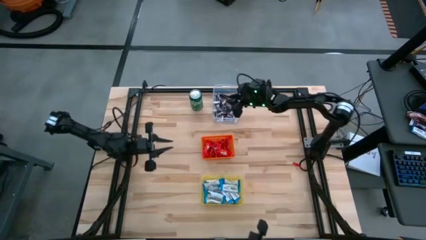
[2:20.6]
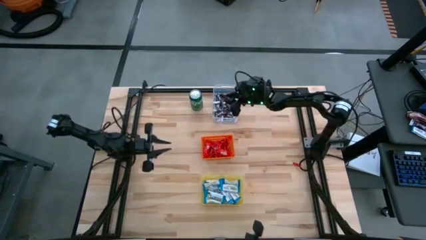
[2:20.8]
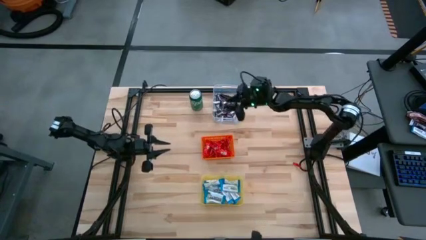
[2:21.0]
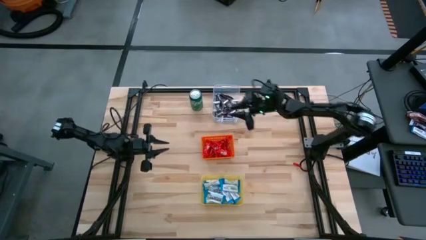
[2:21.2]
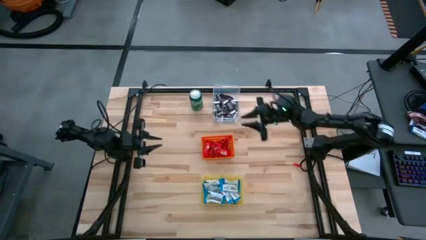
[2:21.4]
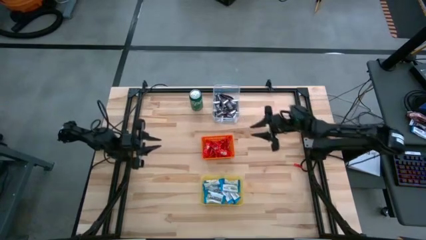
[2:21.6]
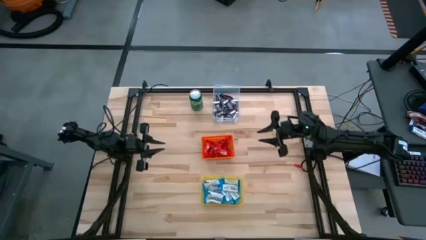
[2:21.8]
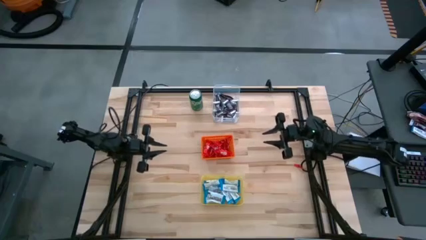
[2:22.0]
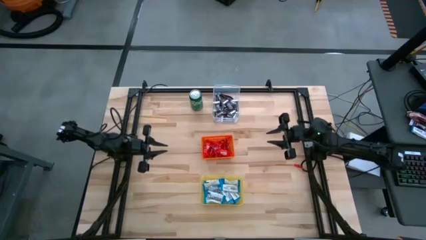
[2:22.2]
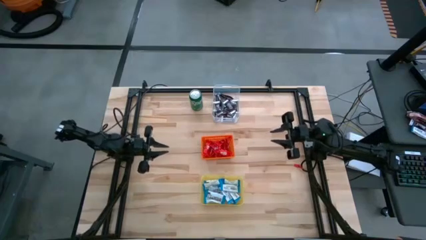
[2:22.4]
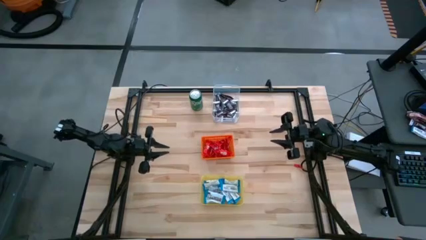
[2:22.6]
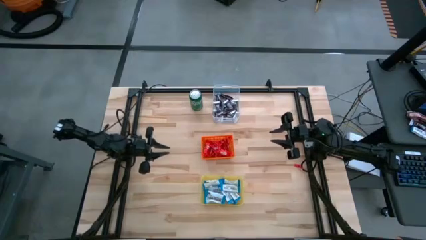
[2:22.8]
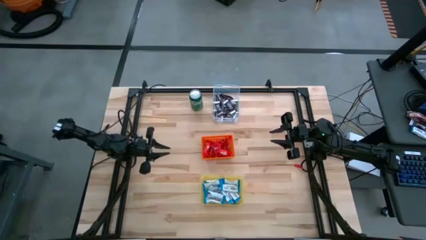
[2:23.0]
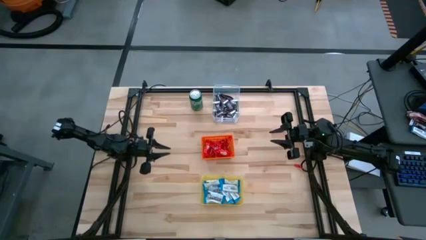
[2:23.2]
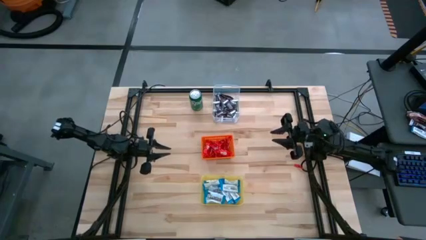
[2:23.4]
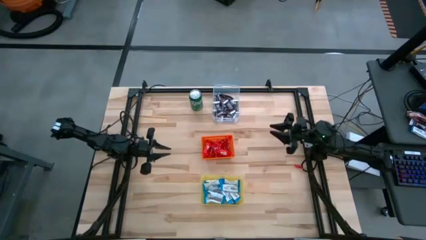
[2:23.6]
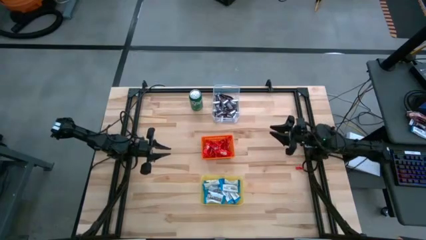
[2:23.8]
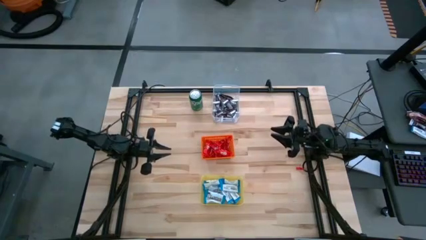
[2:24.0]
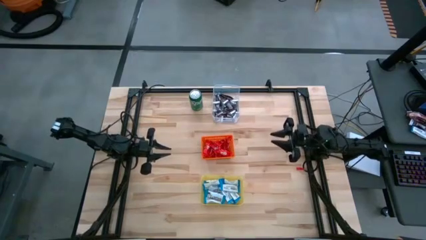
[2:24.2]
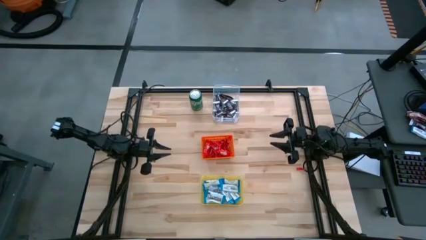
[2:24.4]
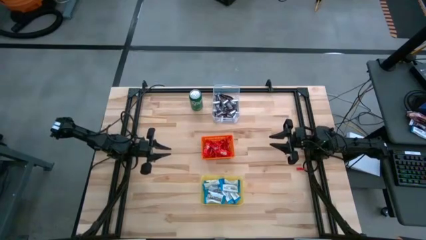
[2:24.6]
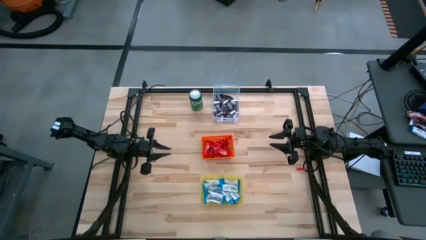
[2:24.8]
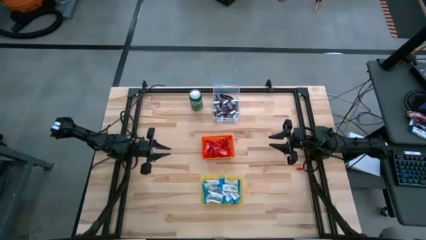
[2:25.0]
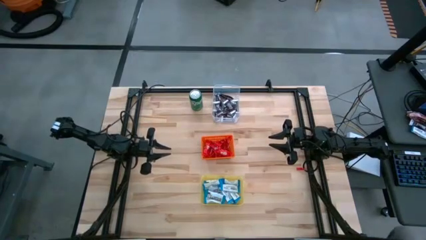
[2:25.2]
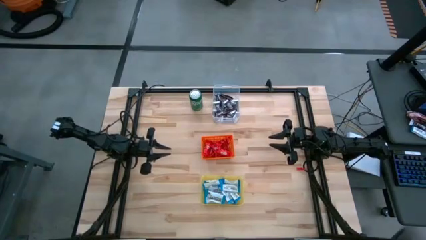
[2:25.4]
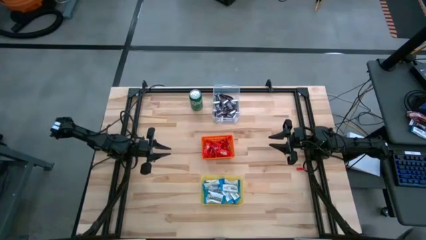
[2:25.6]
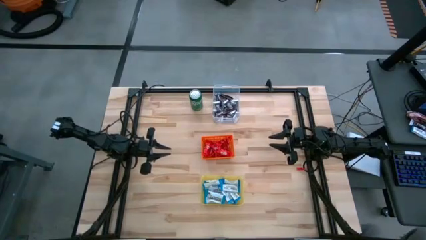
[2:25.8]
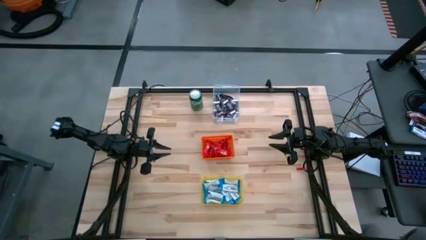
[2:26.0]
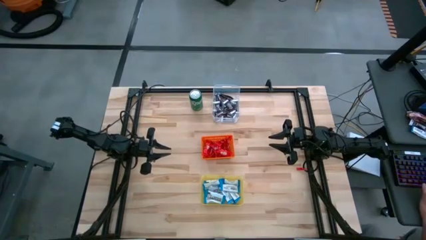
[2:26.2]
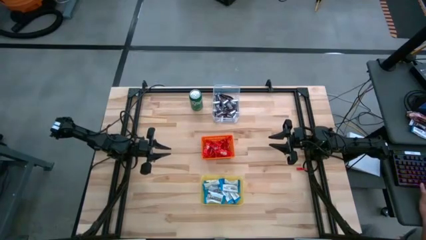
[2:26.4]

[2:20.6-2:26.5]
Task: Sort candy
Return to Home Position

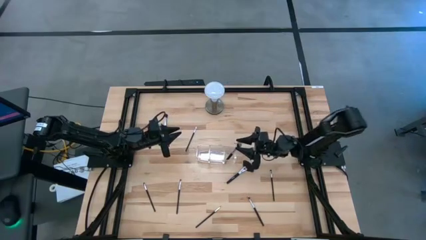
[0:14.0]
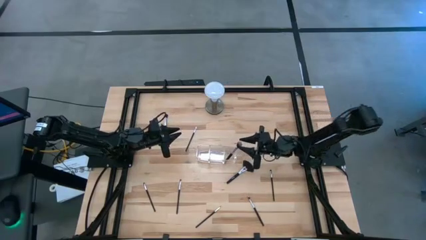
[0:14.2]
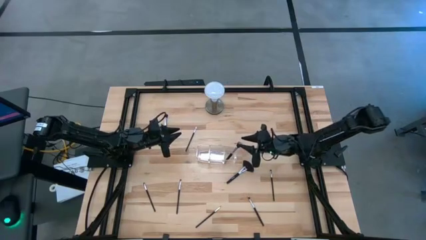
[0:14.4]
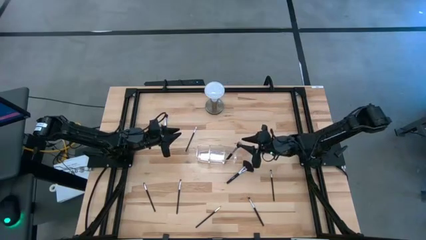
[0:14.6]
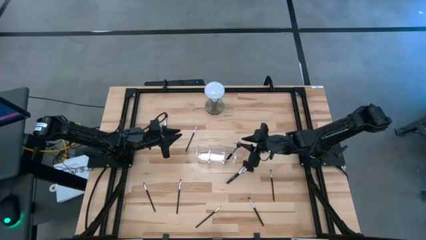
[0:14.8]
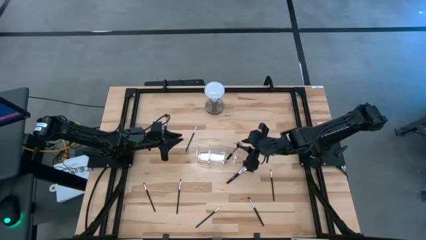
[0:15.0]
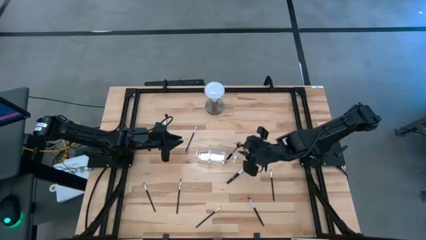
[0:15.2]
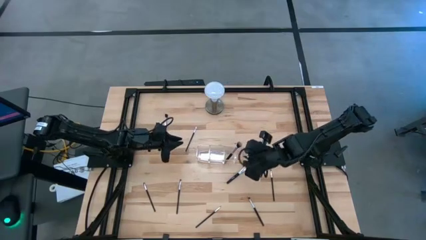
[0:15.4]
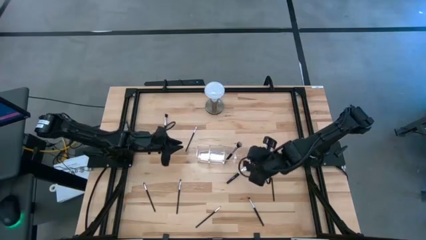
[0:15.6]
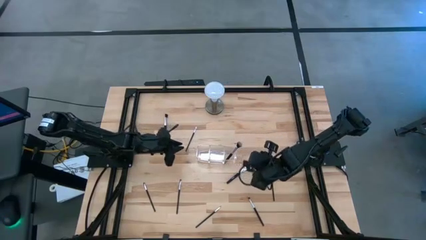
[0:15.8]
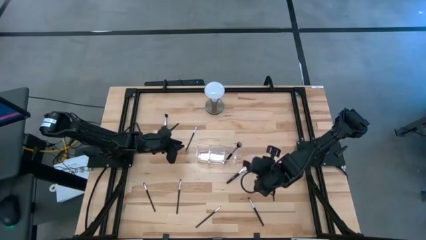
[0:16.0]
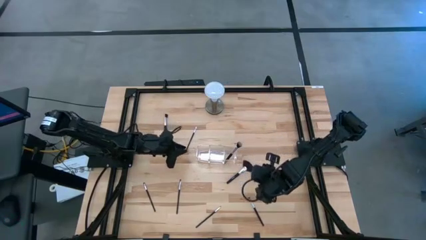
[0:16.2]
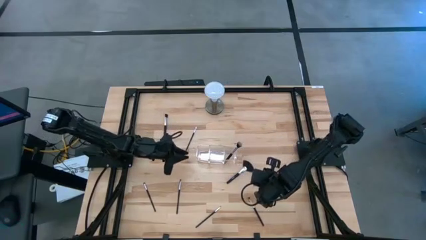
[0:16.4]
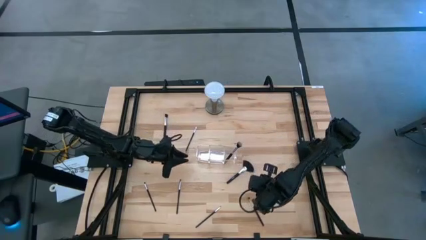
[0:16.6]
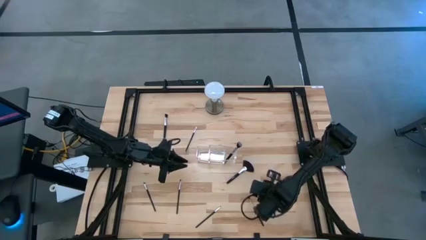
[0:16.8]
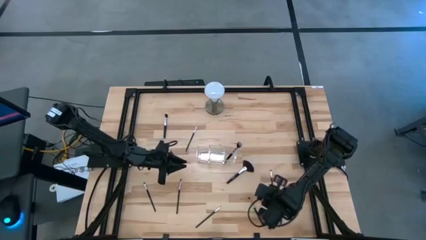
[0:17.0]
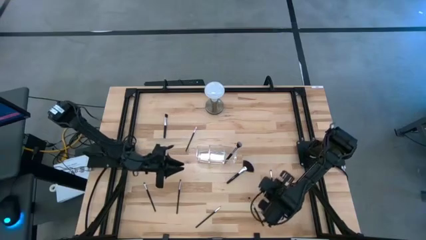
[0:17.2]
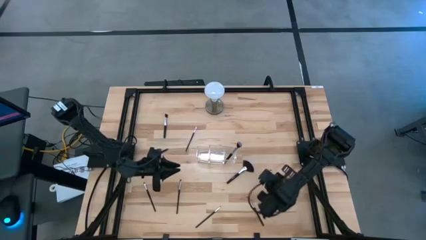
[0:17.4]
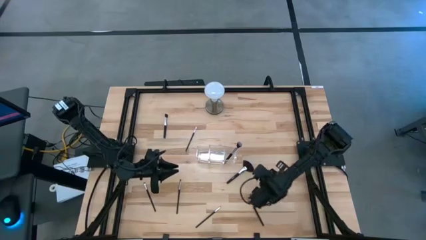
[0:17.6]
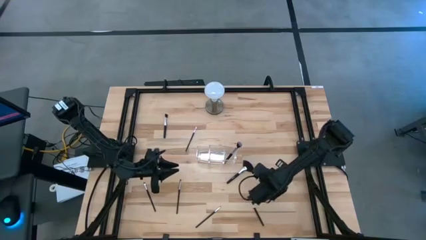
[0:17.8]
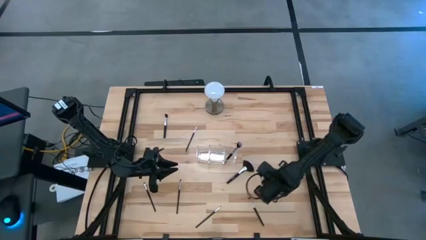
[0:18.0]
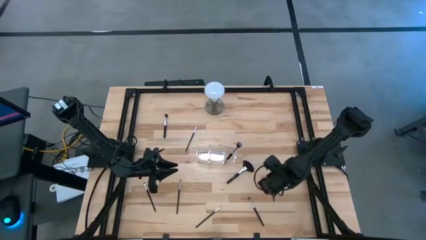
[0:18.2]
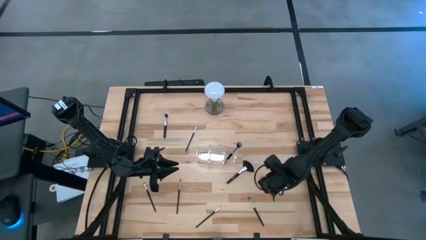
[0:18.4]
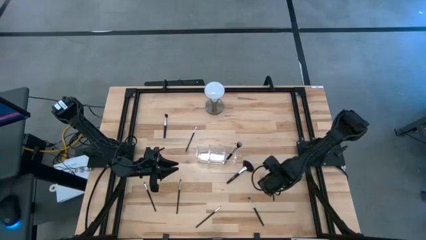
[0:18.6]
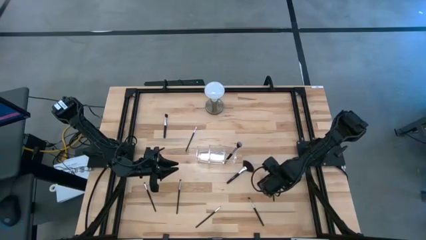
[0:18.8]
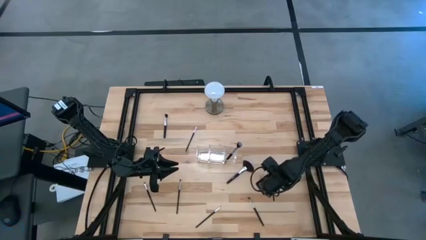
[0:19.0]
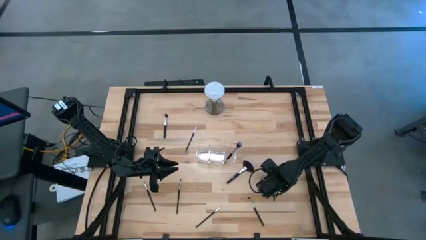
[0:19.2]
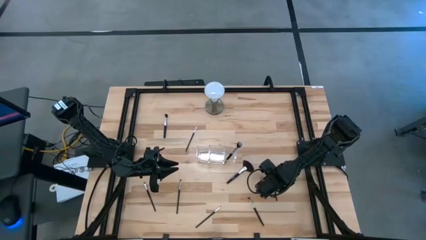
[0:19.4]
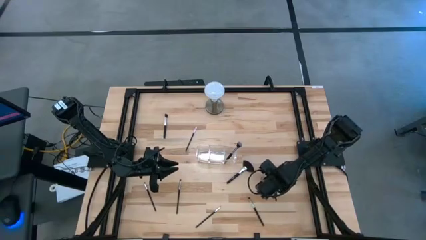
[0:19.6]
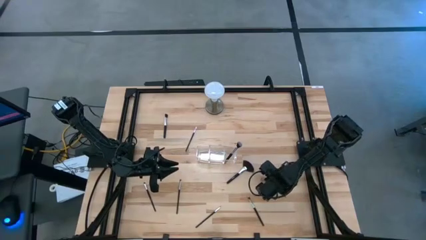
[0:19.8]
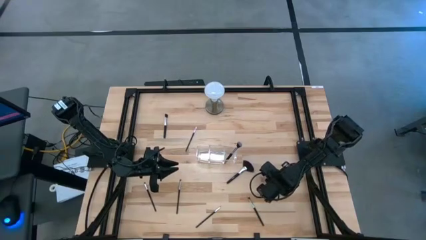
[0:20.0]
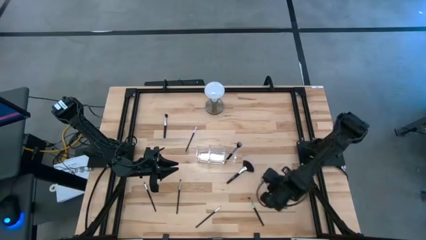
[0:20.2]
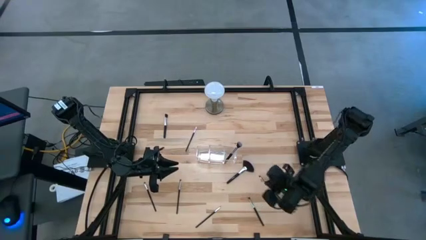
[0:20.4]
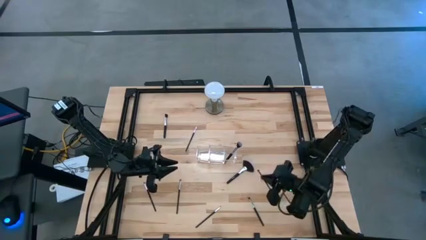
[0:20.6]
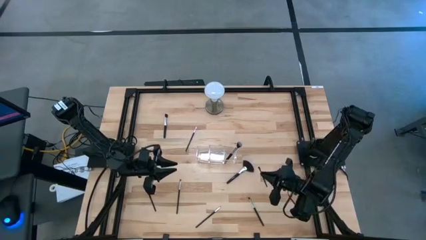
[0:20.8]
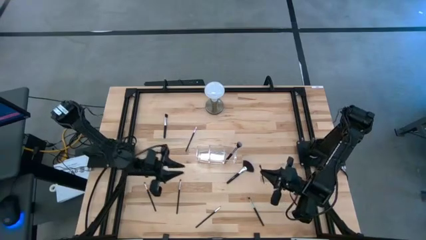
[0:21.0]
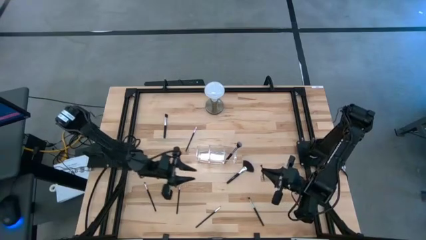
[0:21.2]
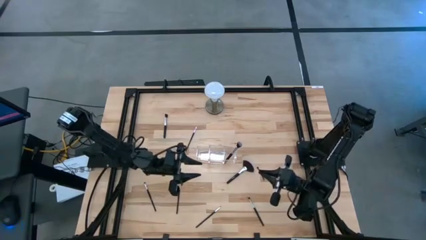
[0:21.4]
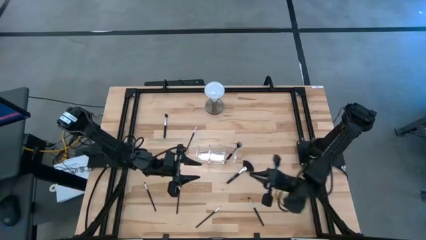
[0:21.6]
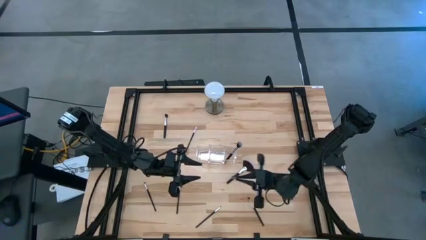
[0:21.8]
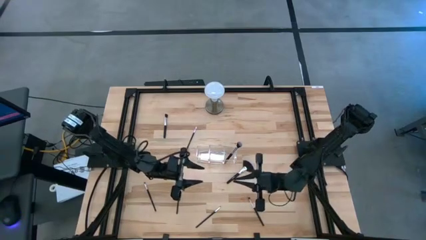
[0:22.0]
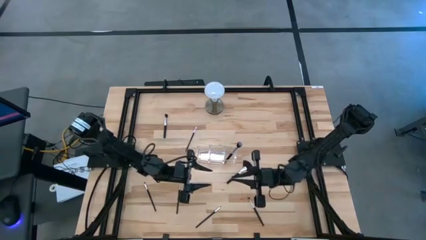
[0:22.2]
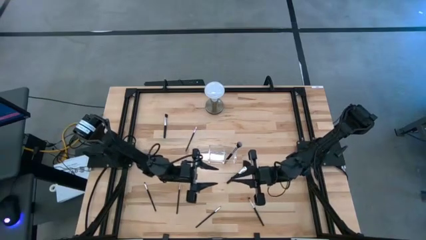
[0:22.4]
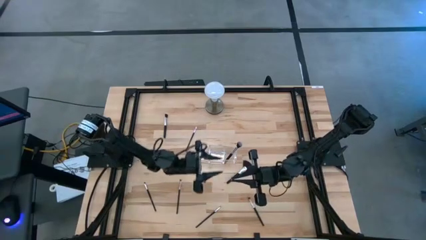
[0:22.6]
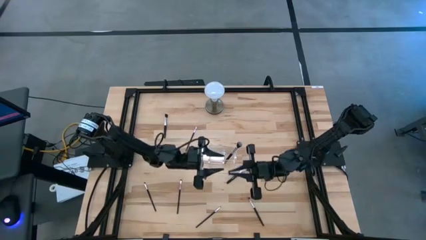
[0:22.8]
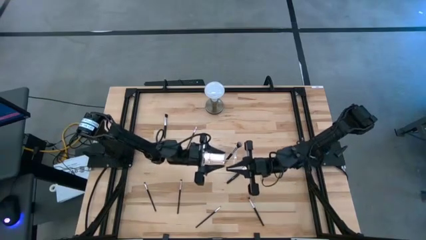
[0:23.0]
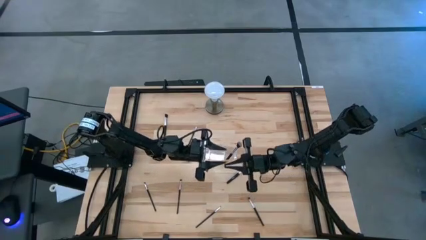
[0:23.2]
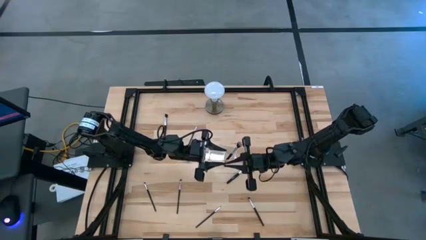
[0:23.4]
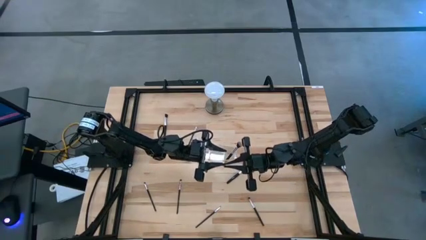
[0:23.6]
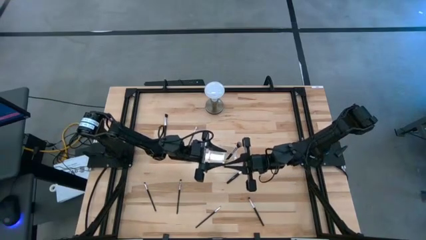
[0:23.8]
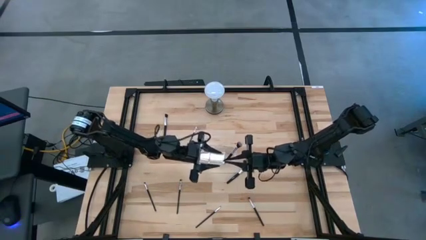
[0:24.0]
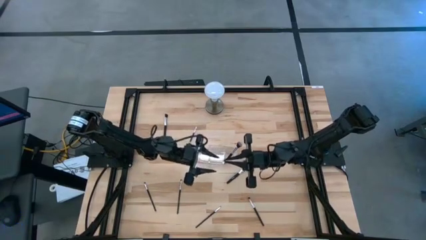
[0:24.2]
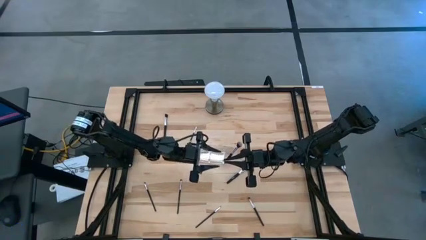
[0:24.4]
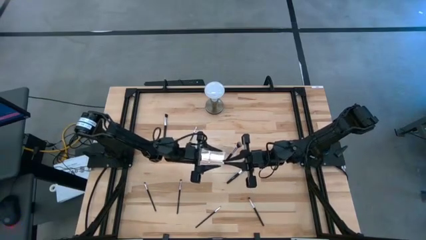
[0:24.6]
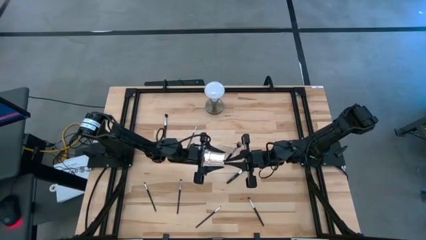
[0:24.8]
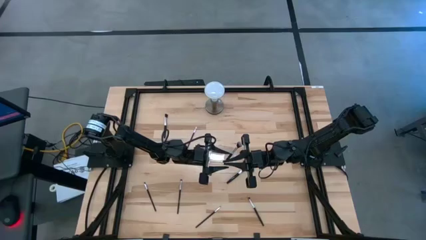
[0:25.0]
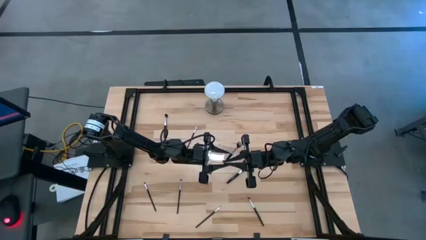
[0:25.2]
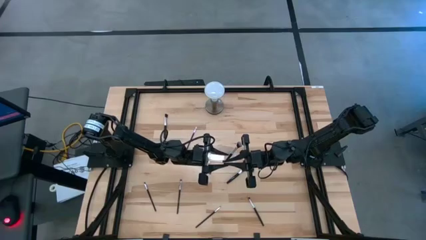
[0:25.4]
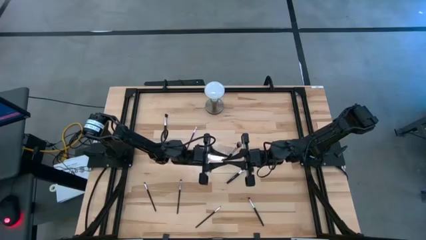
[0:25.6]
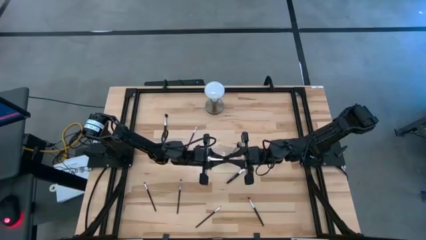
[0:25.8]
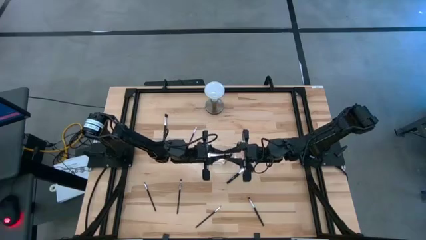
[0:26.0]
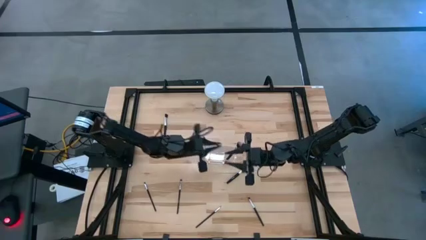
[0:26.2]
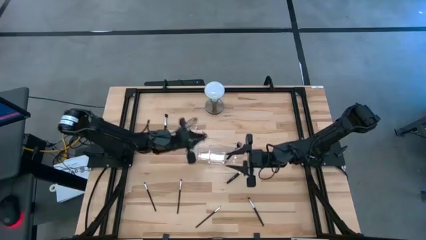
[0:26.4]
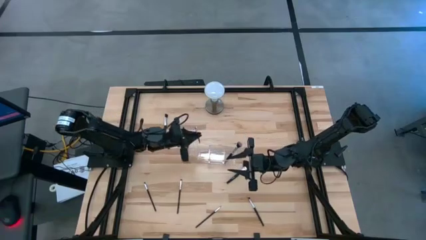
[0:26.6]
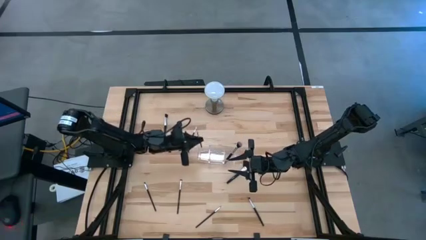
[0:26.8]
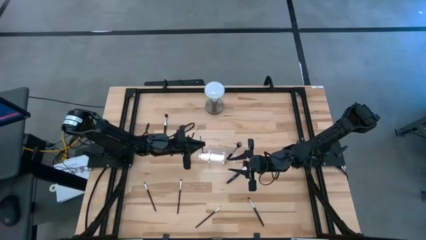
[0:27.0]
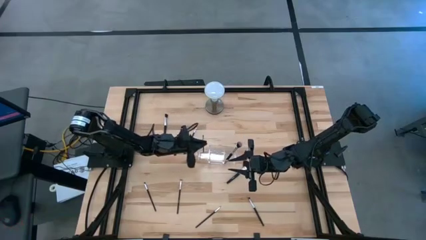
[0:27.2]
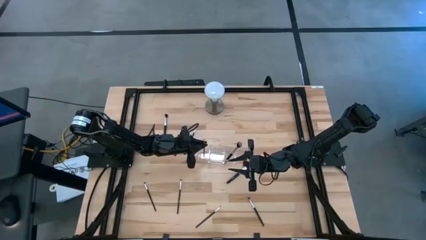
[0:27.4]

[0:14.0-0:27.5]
Task: Put items in baskets/containers
Put the black eyeshadow brush into the transparent organizer
